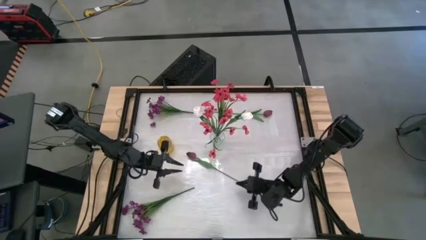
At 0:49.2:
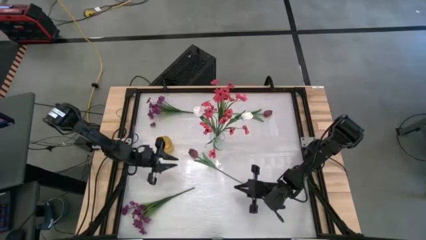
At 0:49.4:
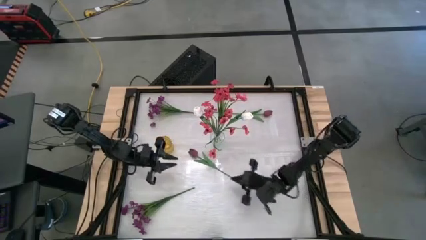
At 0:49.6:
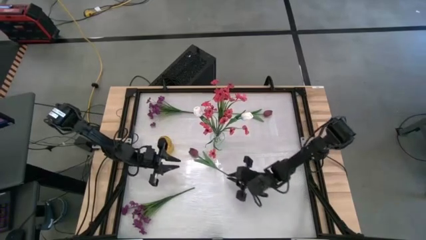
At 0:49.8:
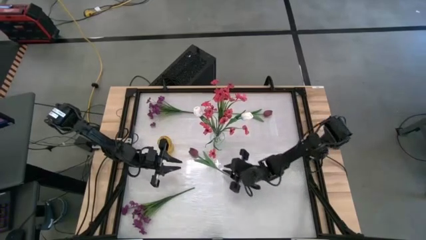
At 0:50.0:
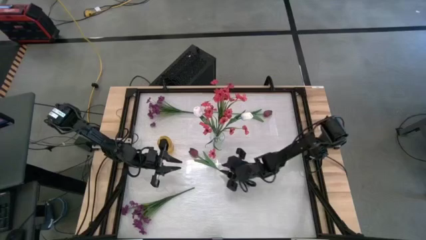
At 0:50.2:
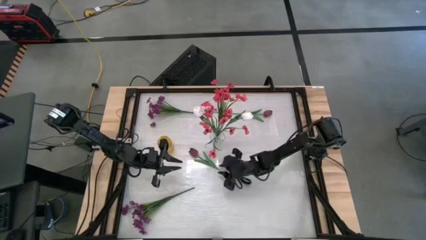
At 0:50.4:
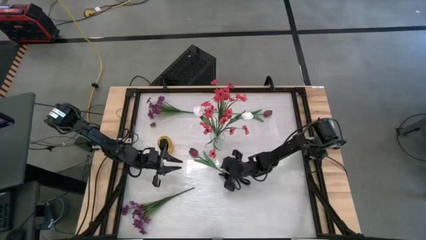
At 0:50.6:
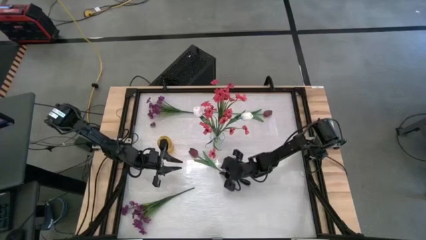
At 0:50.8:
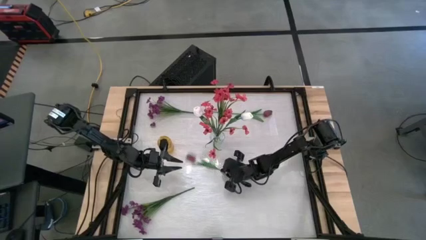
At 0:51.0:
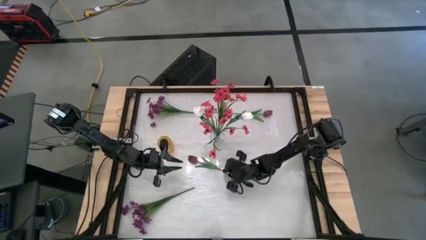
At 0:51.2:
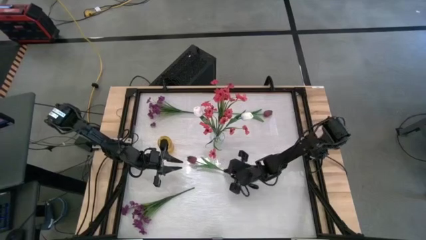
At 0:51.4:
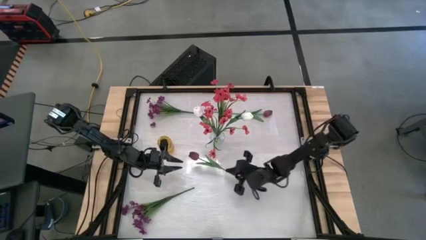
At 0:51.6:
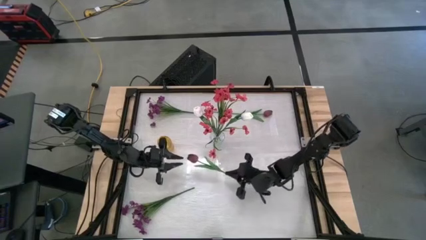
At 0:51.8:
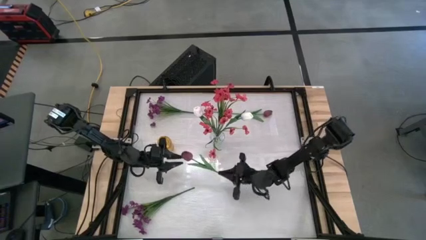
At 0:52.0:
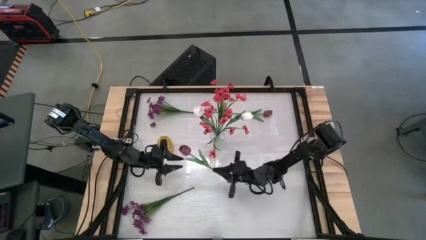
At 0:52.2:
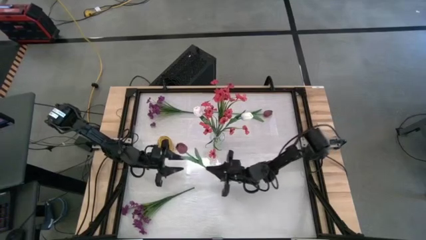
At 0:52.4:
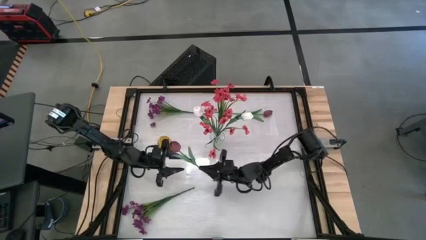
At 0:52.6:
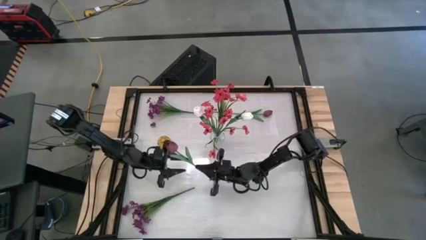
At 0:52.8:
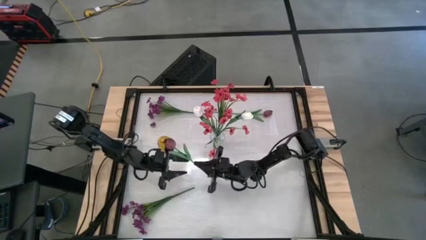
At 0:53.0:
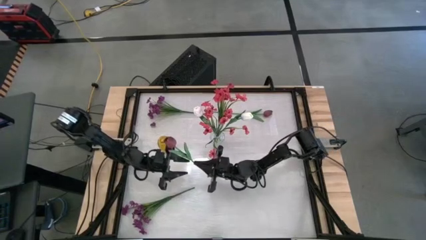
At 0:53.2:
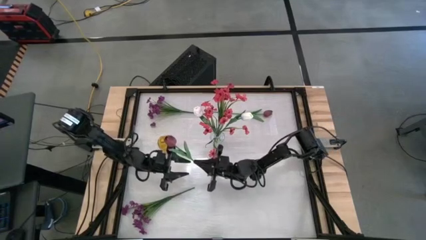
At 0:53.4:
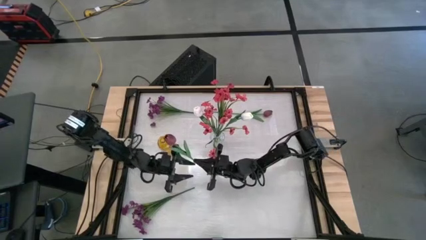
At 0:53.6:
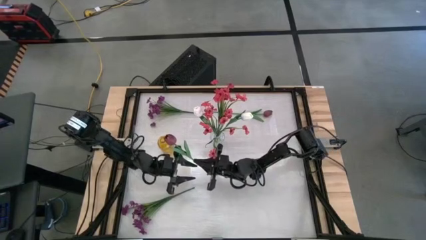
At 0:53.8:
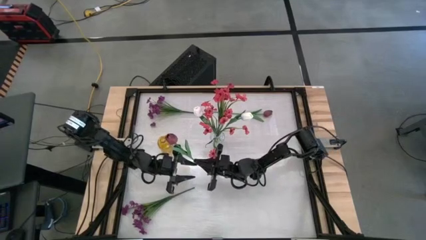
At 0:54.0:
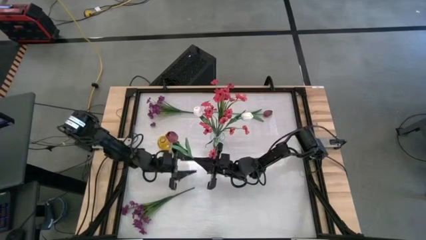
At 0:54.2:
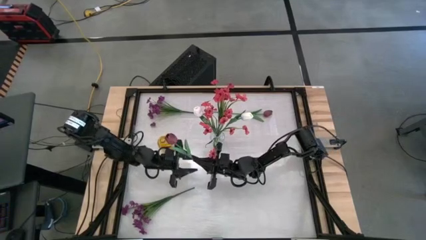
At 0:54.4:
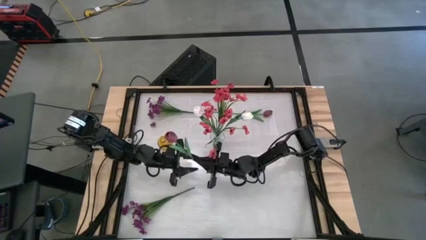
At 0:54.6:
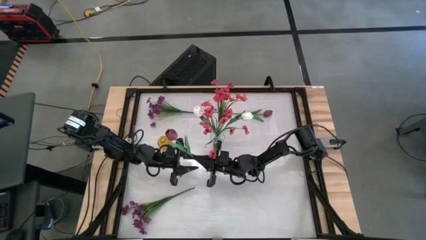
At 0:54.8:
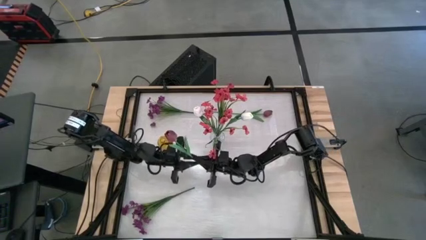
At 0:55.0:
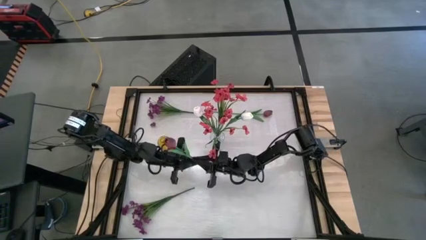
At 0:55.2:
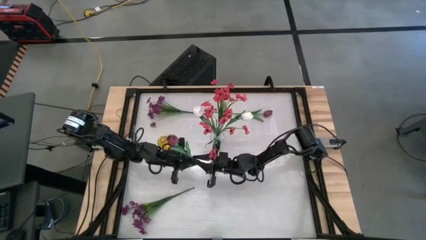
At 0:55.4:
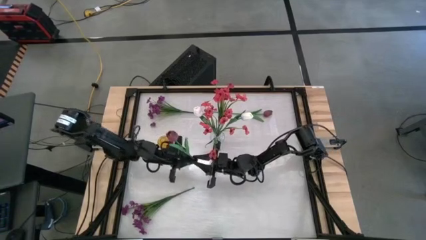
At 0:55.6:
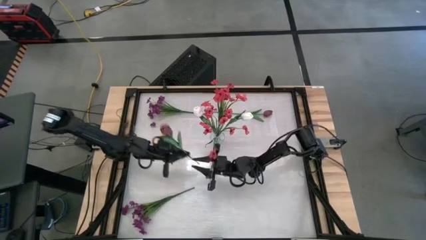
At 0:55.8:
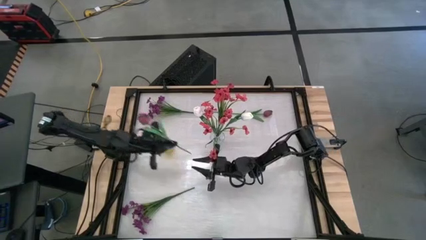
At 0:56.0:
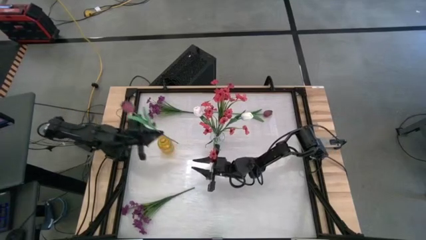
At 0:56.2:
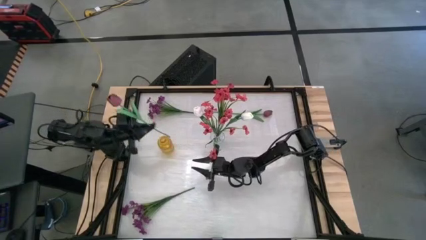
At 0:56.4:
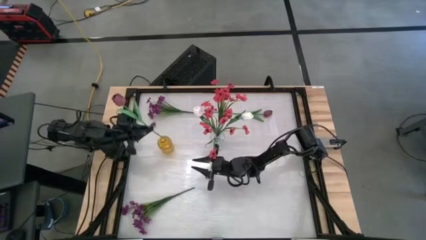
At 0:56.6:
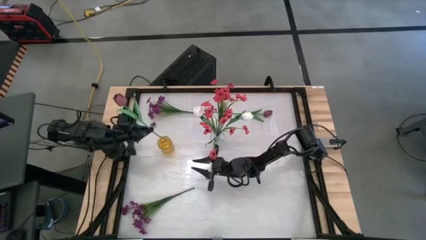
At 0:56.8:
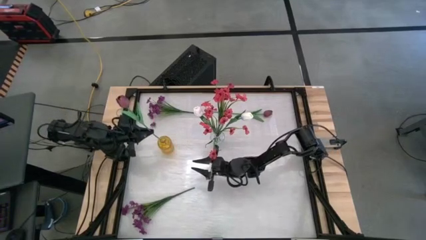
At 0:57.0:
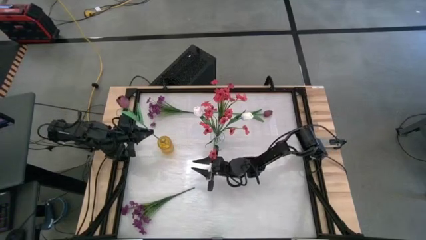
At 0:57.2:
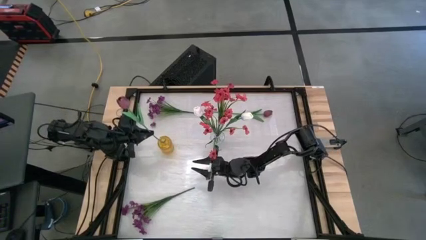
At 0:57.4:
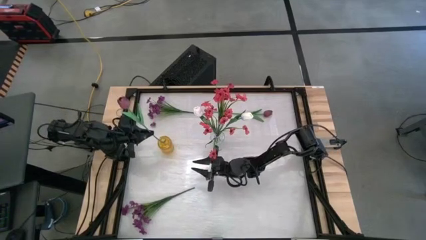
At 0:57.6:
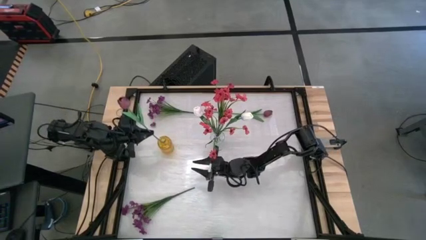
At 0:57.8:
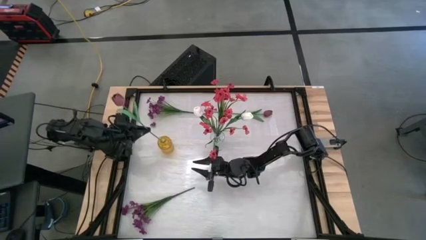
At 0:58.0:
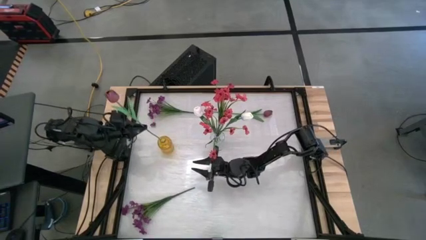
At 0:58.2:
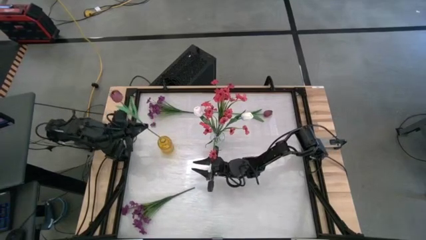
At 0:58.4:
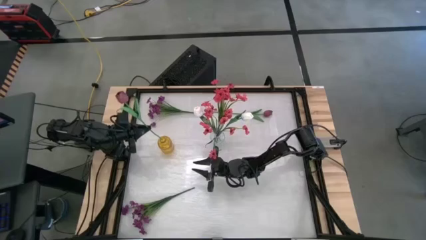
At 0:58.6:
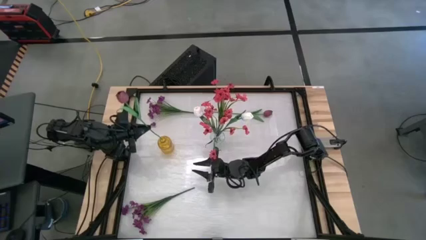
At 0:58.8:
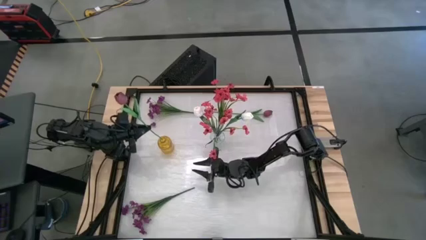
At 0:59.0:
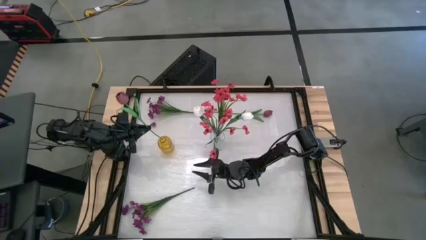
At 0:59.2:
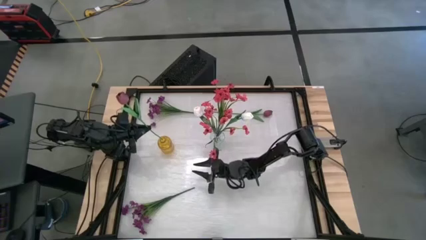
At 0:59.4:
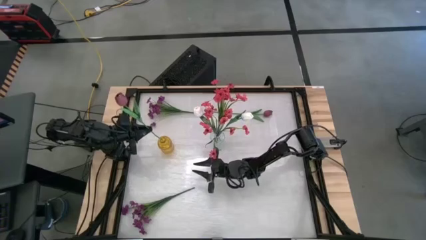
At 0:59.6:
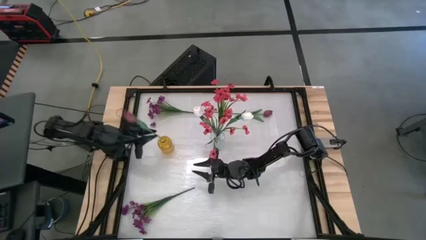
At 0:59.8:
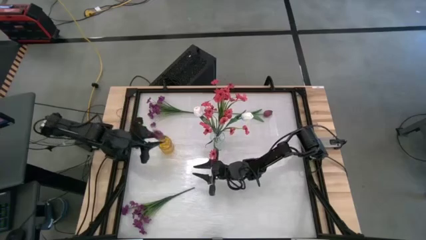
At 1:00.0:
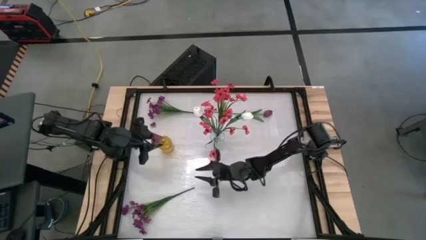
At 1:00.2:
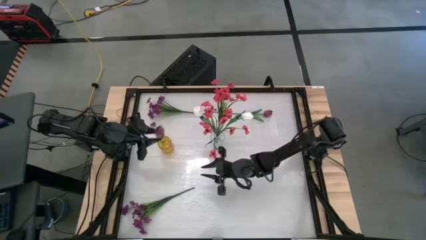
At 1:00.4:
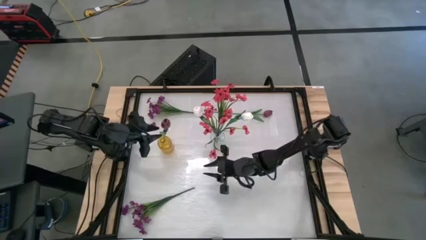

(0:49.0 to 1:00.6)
Task: Sort flowers into vase by color
Put the bottom red tulip into the yellow vase
